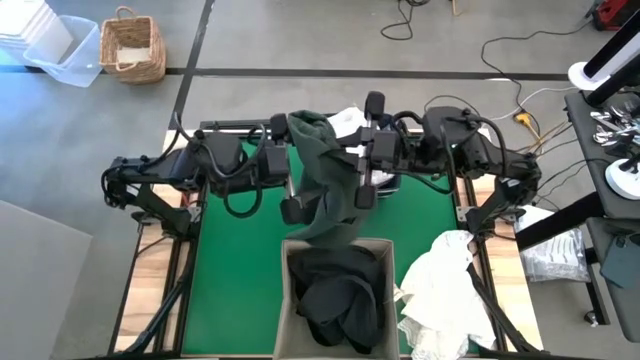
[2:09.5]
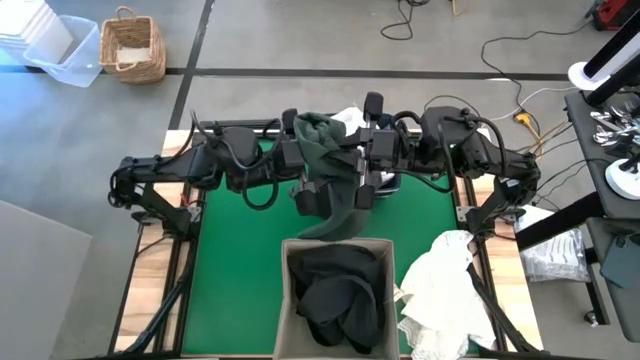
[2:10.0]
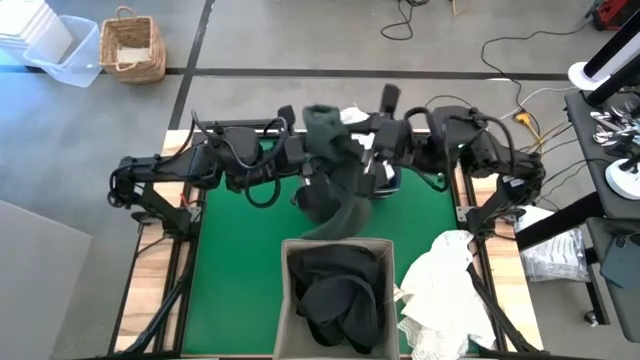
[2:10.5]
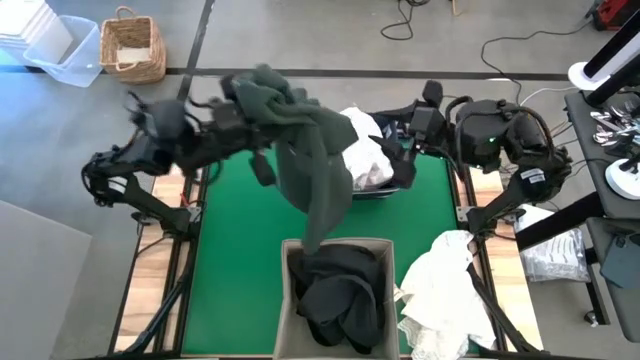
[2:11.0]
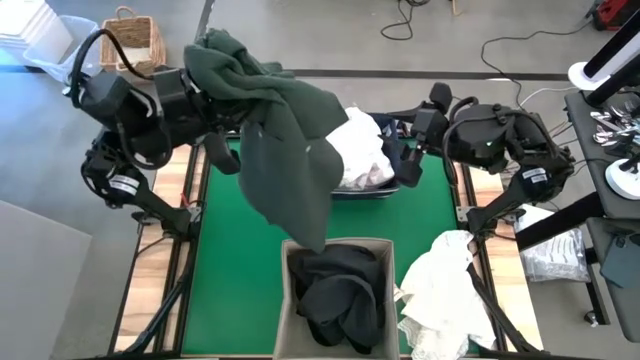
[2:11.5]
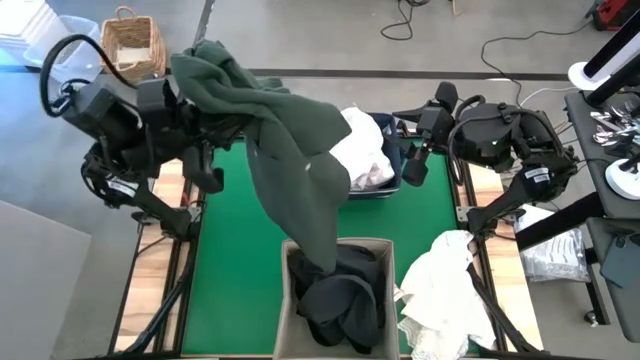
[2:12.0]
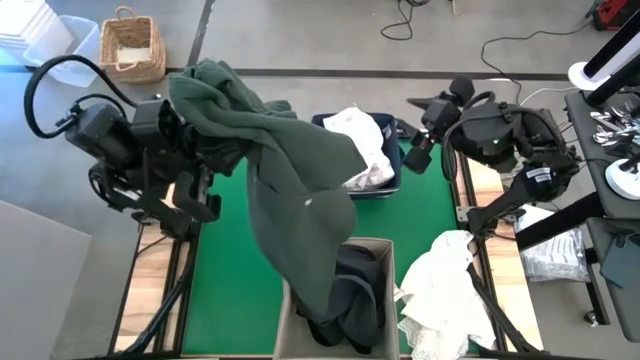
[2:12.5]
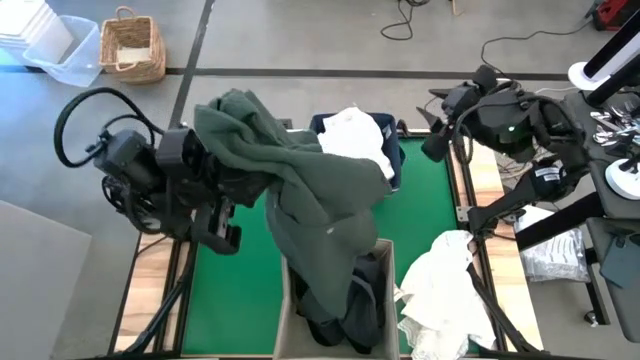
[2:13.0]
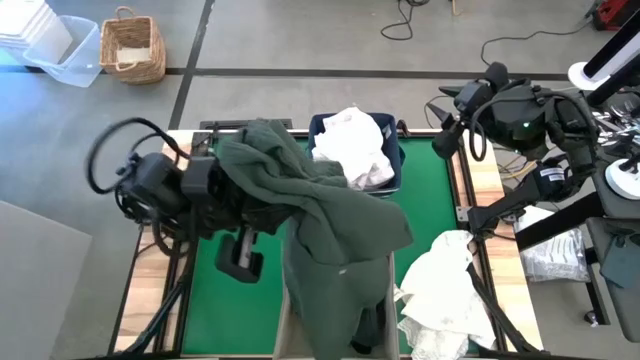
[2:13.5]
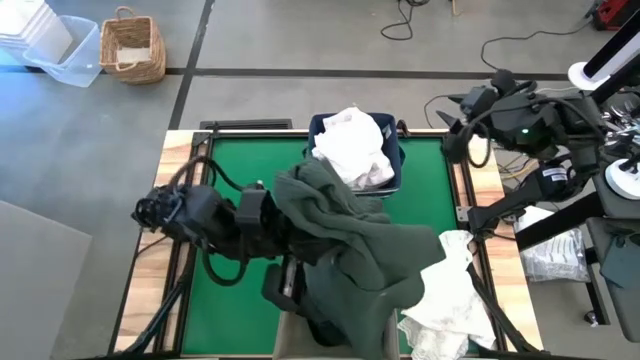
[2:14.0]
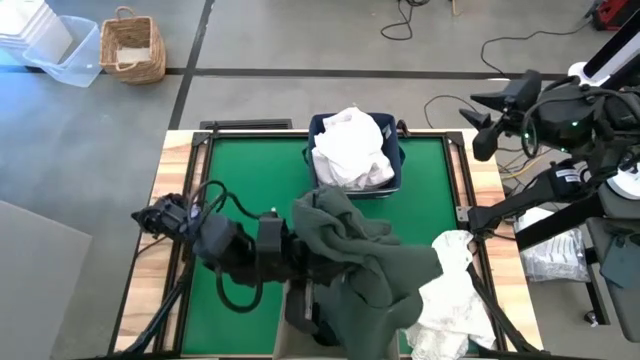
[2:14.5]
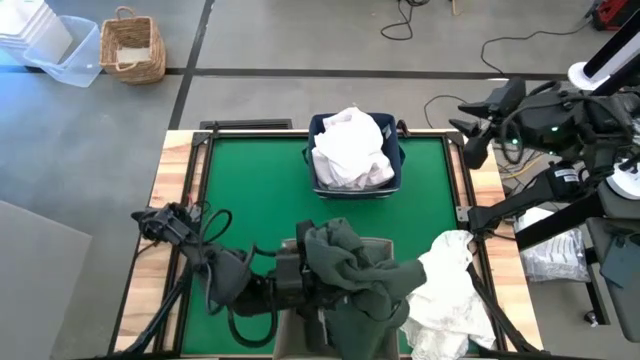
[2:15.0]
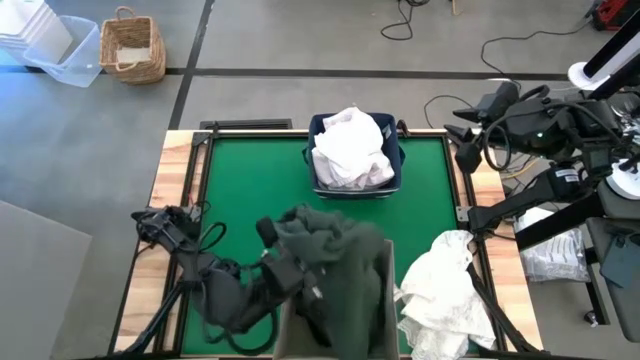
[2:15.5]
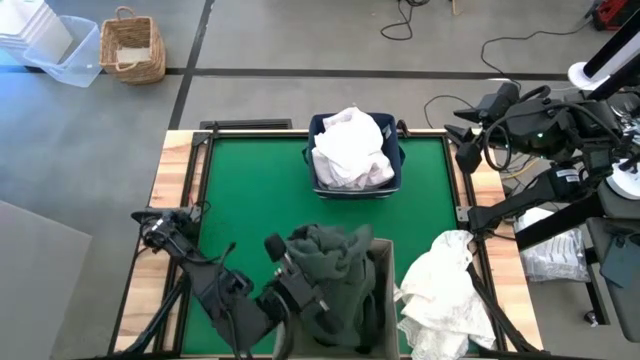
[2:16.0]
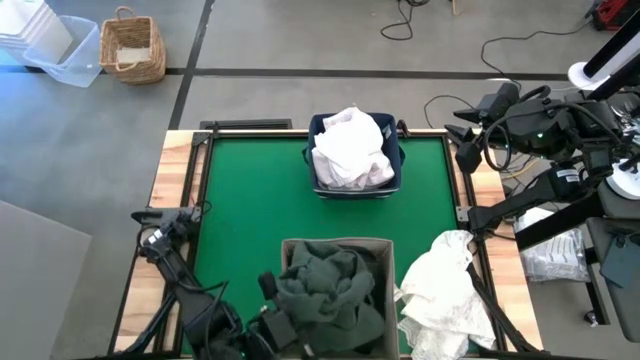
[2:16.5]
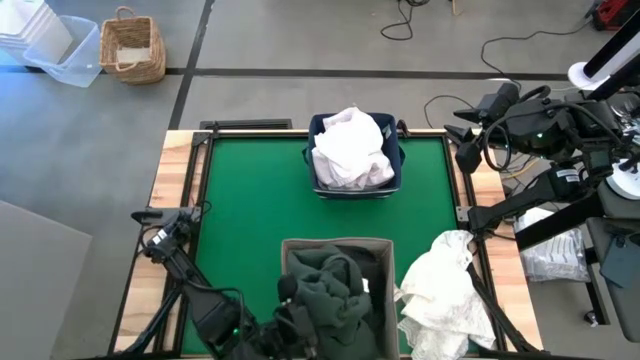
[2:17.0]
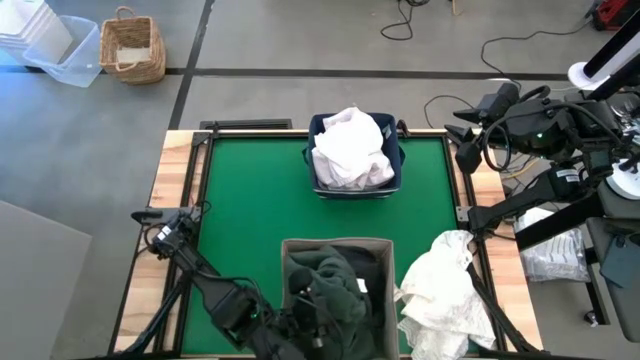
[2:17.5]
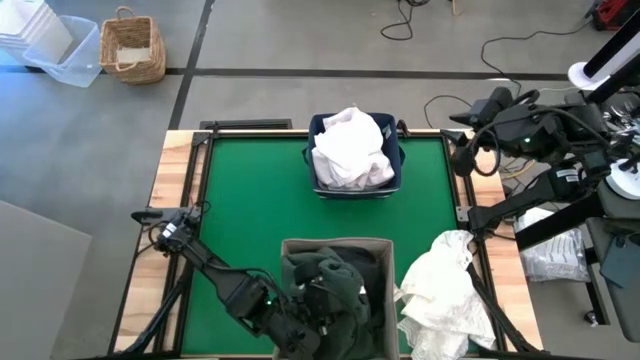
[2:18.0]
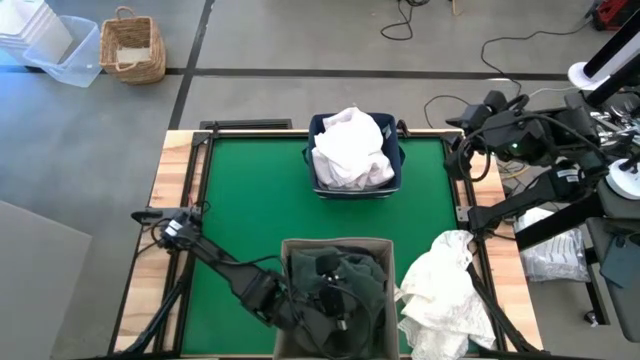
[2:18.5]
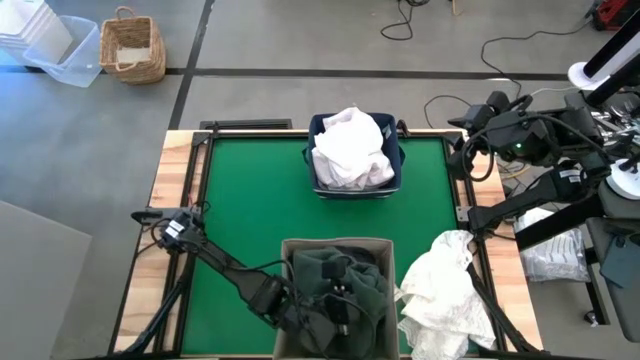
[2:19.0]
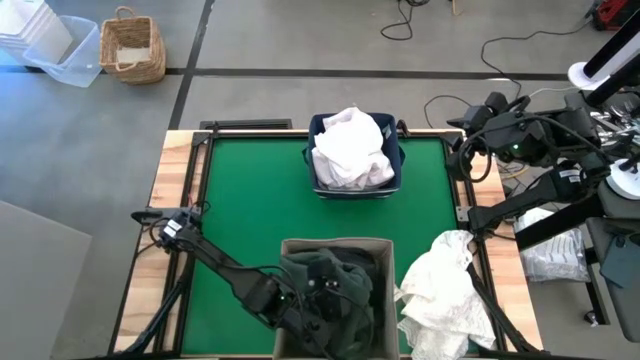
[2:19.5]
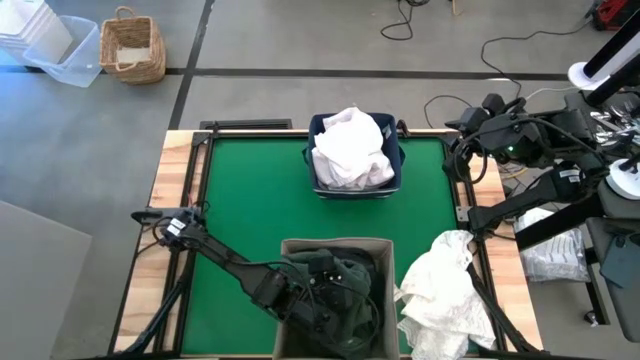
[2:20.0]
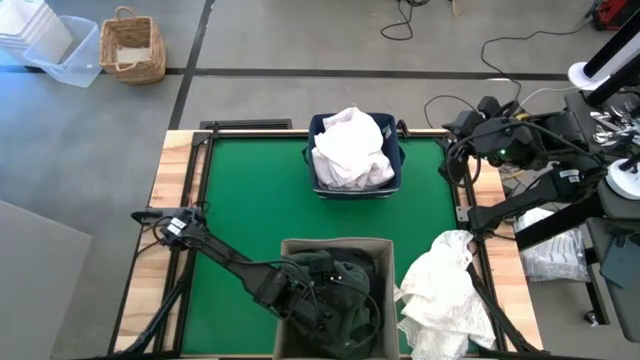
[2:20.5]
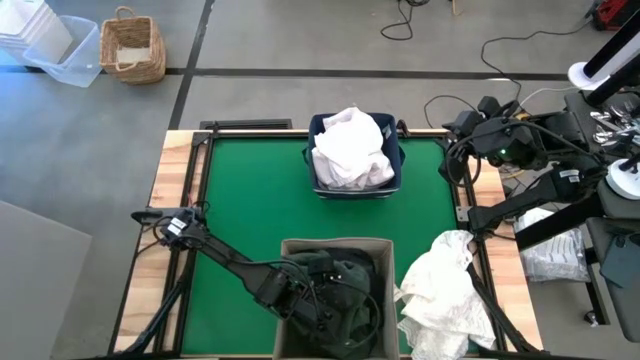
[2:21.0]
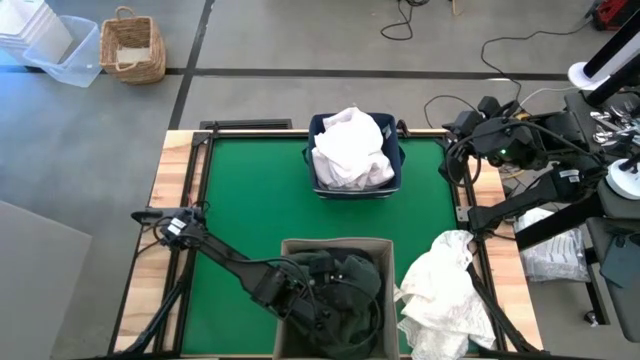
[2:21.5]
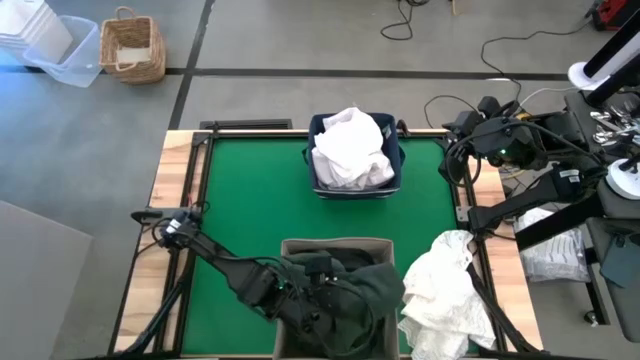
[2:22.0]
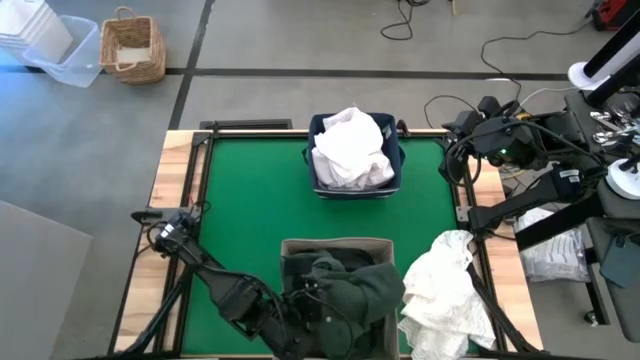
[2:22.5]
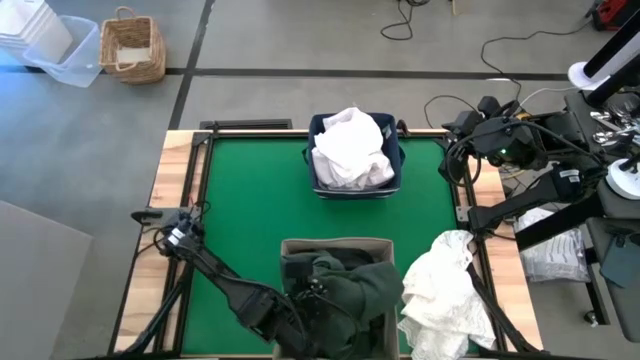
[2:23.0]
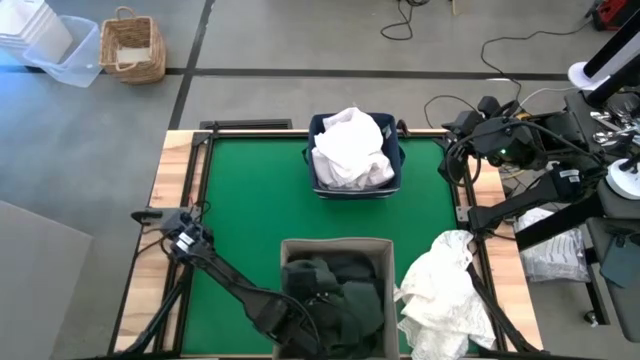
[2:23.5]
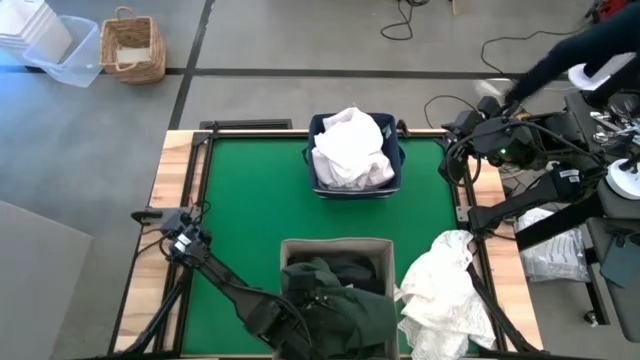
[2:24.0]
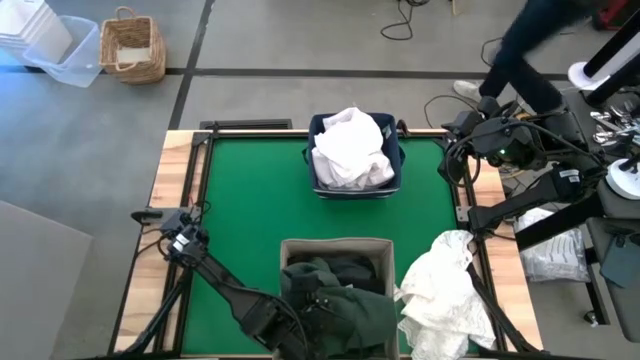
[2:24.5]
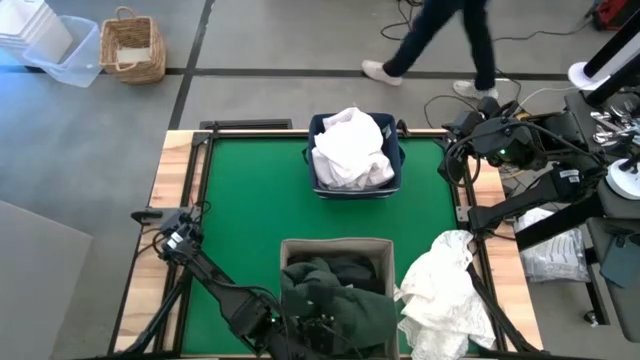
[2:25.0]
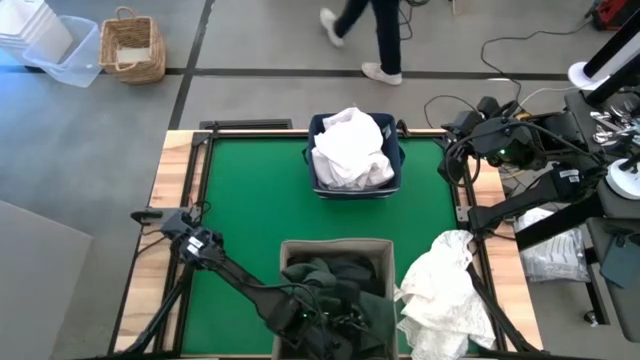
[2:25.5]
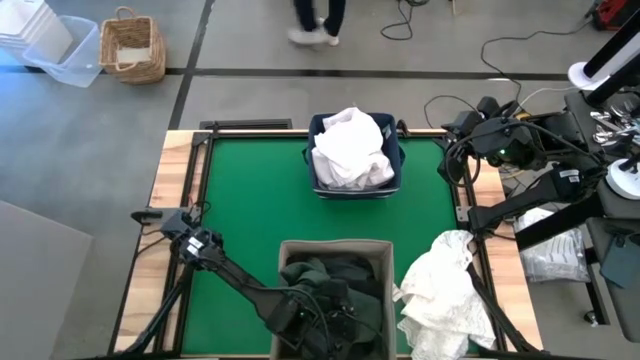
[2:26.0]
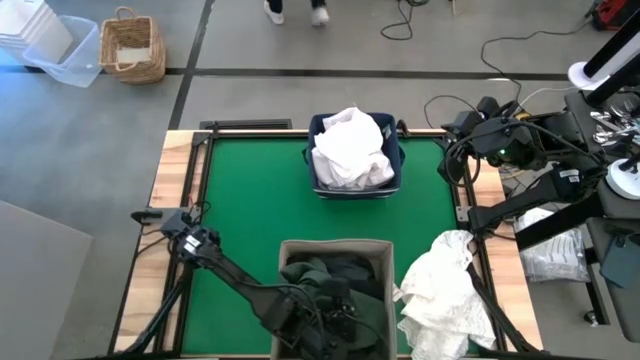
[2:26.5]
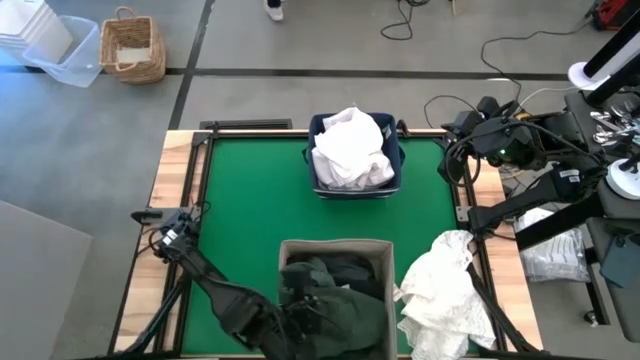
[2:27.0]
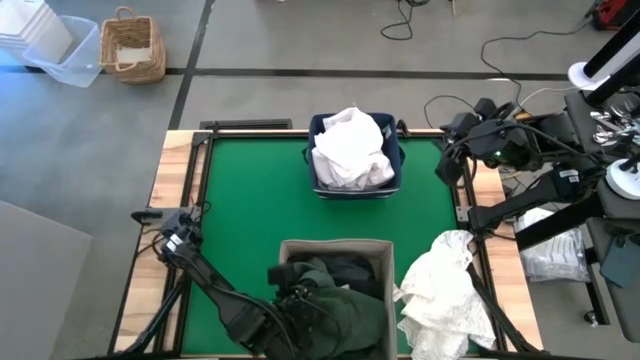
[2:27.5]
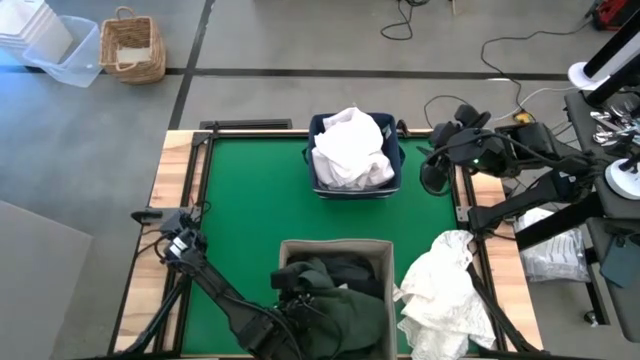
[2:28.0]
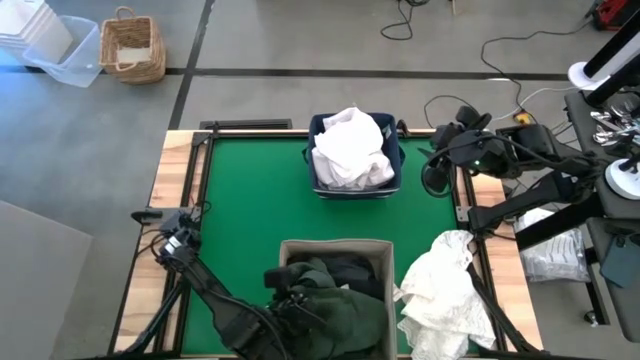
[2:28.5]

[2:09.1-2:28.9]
Put the green polo into the white laundry bin
